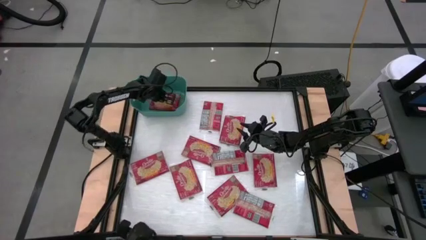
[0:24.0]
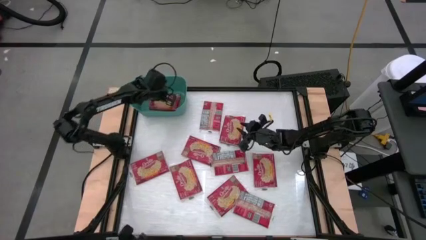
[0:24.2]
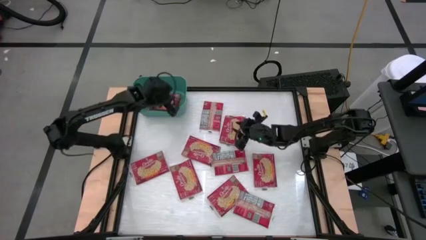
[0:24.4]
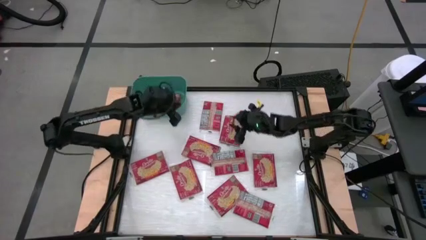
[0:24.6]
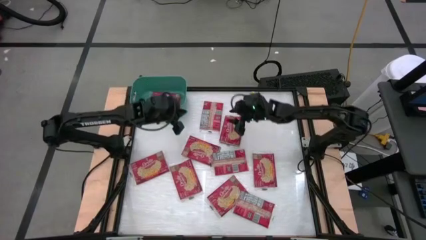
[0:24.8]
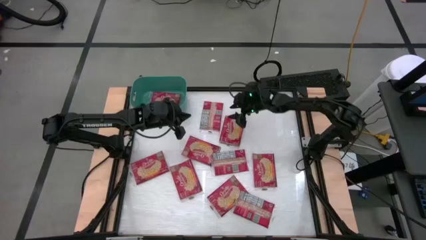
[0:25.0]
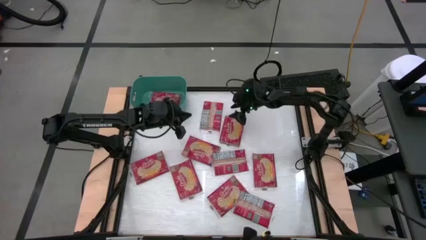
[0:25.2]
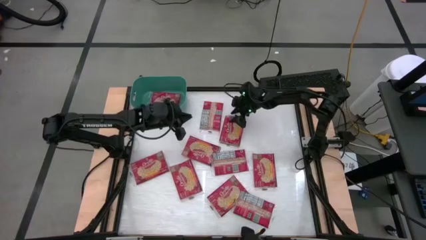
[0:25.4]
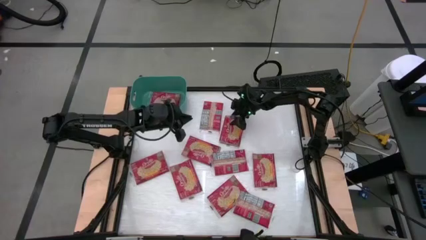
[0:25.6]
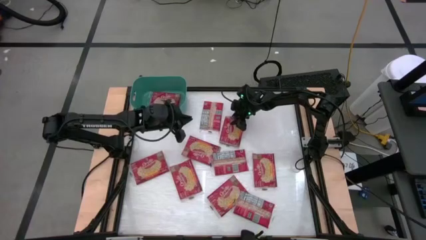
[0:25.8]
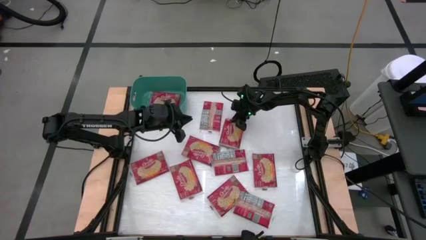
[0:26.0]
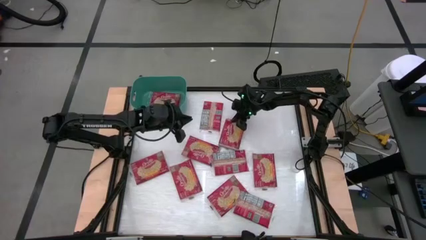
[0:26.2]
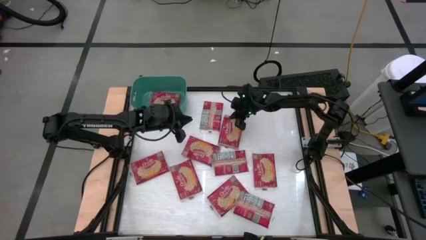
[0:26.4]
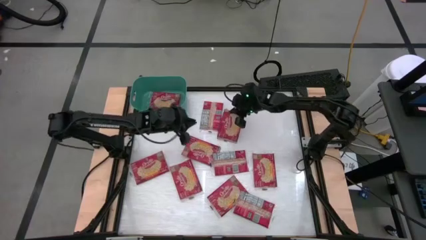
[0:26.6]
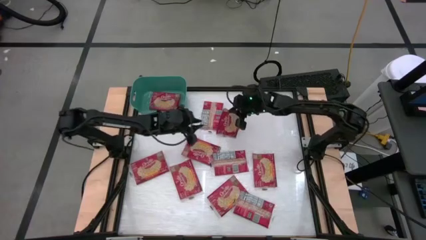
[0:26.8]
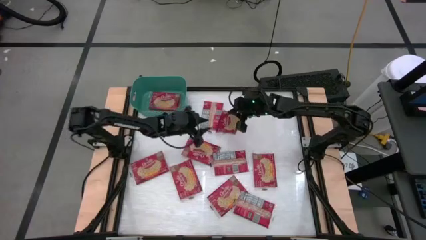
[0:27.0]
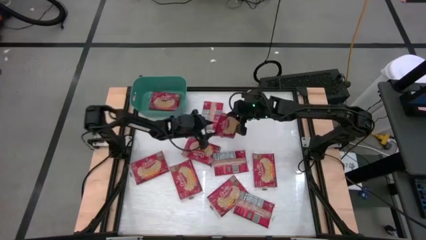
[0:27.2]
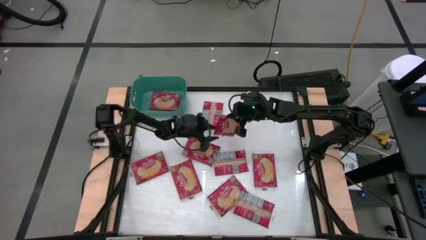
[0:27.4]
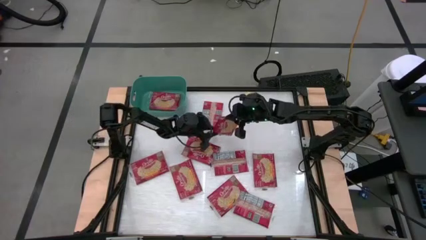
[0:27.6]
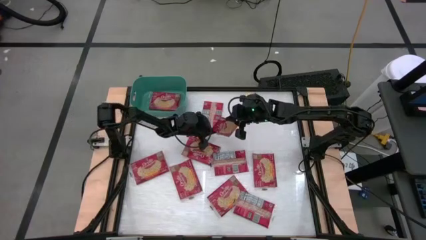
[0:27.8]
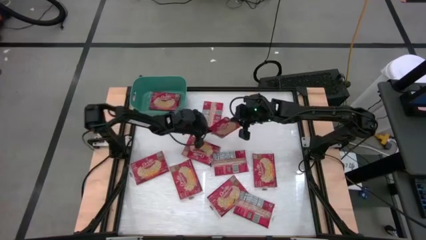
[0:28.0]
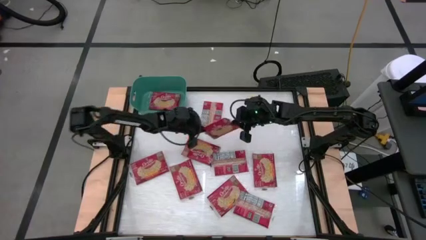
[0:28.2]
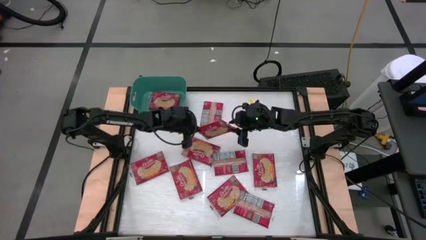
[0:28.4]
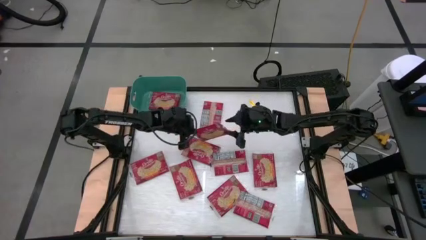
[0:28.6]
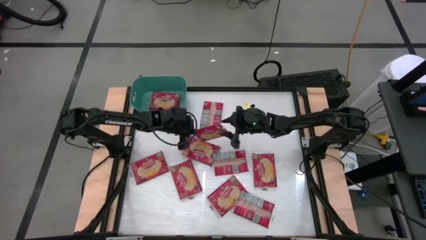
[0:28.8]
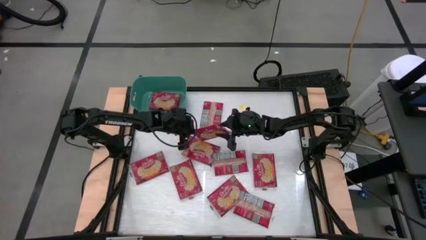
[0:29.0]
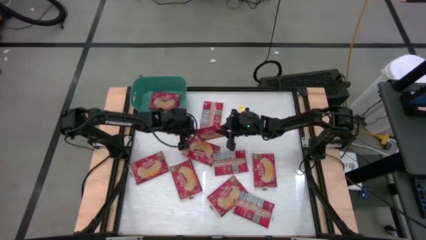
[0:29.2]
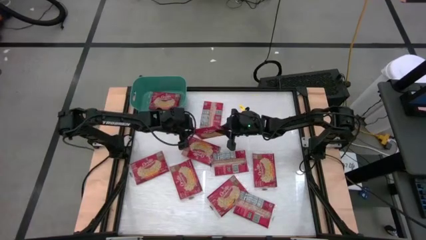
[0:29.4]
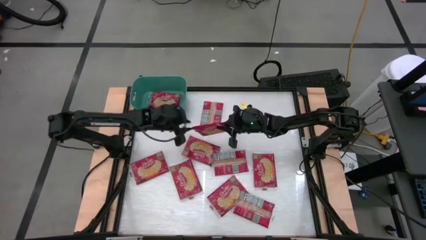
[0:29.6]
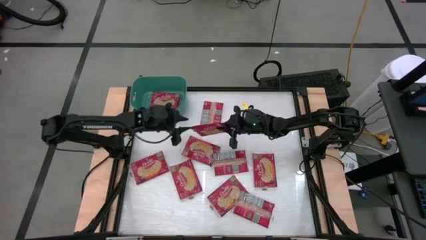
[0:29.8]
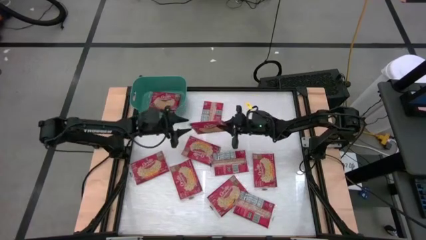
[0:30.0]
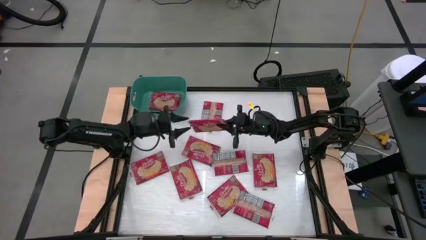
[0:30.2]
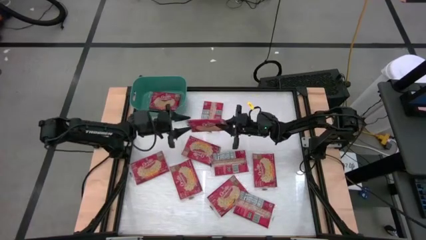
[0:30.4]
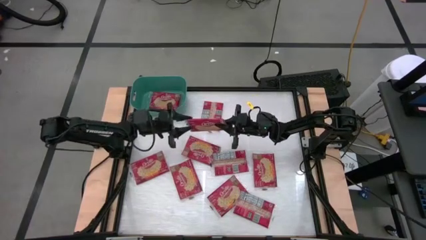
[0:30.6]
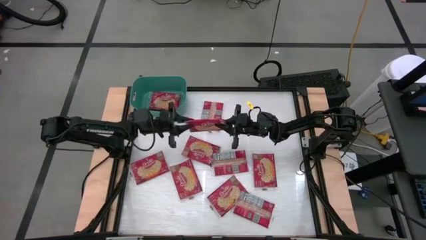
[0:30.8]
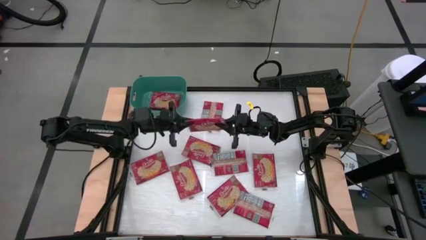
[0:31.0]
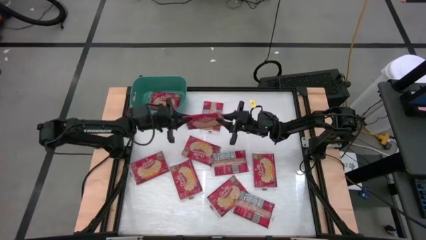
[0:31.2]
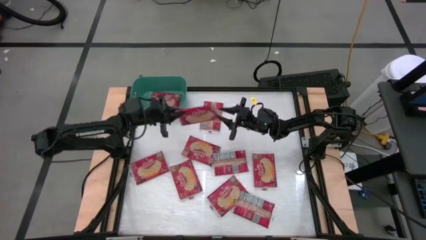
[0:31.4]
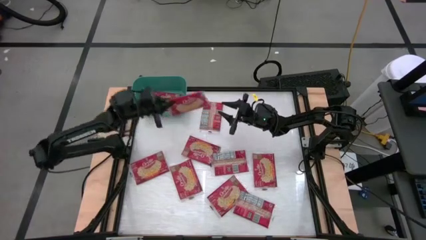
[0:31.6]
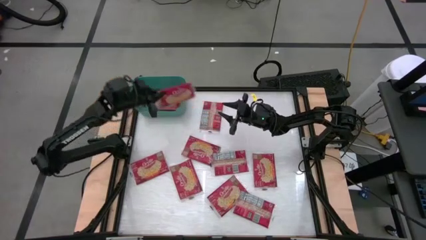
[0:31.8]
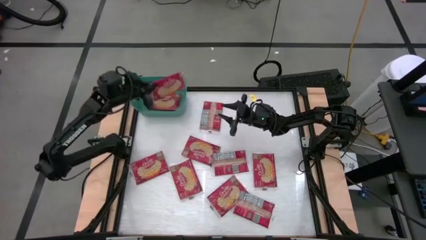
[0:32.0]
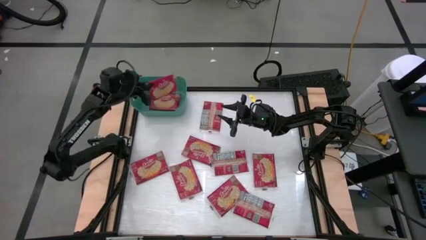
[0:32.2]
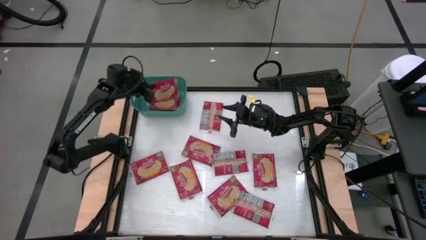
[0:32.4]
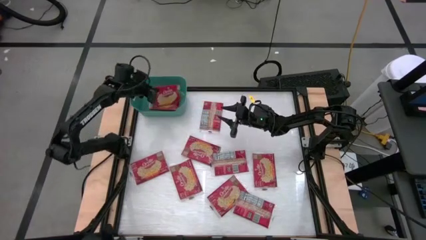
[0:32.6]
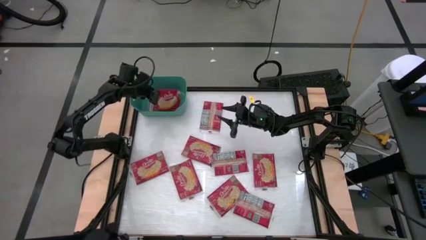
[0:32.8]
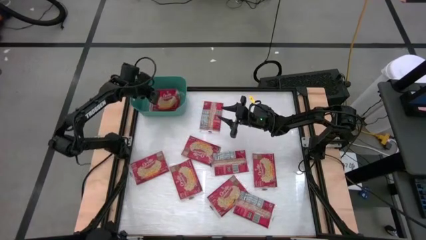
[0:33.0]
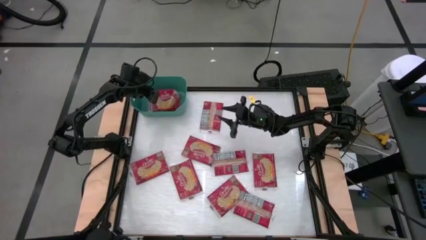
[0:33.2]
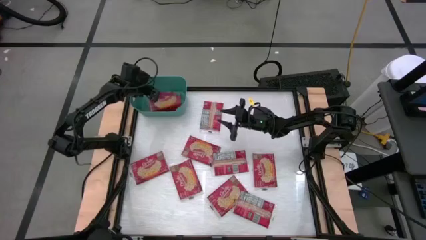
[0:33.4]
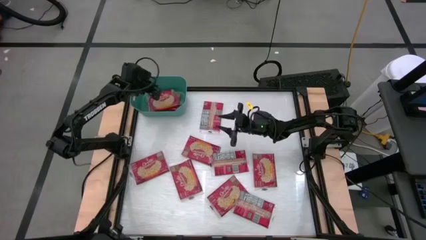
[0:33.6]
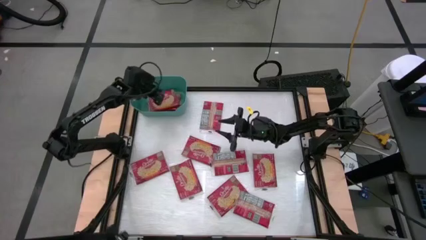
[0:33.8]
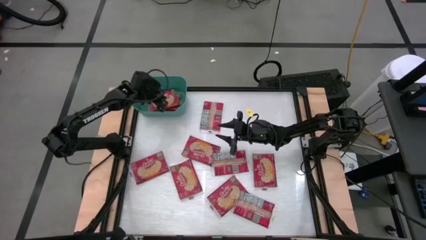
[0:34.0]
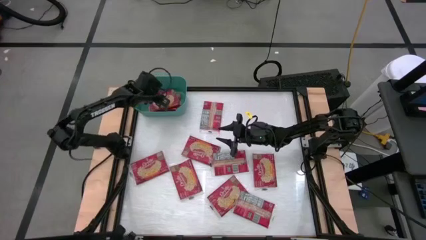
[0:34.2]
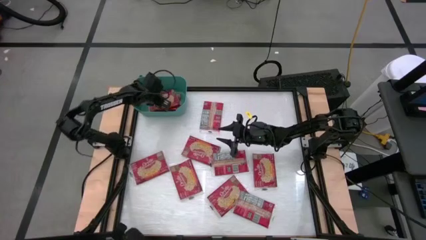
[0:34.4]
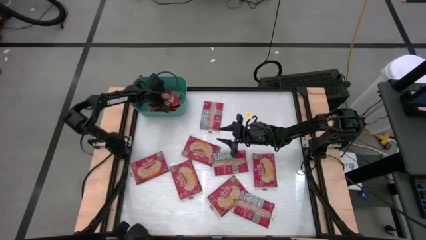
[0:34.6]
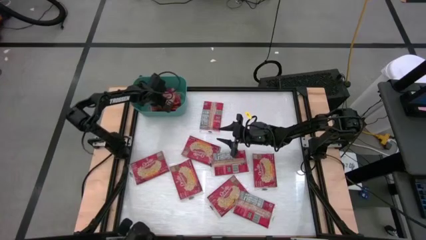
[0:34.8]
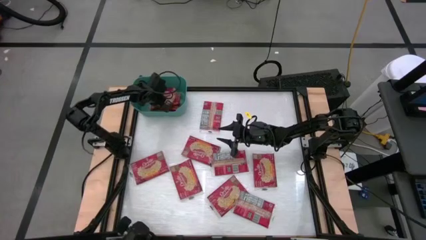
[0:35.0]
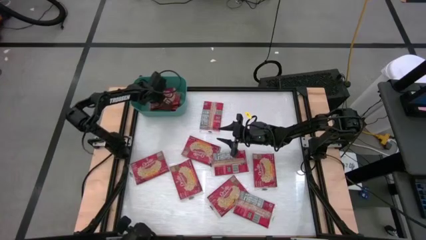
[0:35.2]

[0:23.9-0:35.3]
Task: Sort popcorn bags into baskets
Stack the red popcorn bag on the red popcorn bags in the green bin
